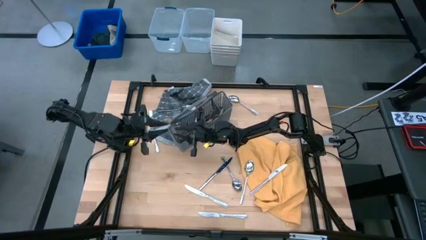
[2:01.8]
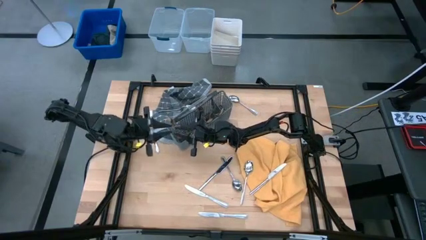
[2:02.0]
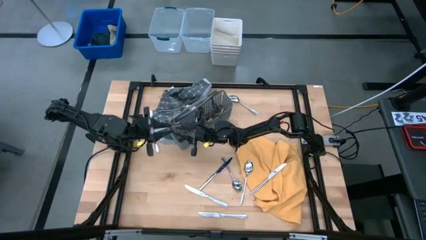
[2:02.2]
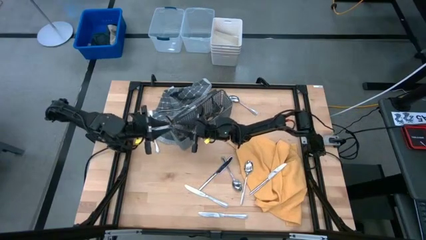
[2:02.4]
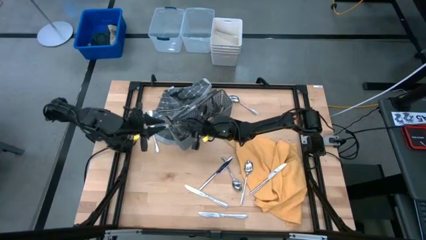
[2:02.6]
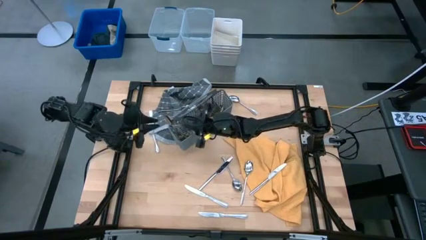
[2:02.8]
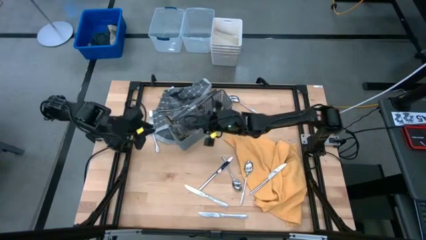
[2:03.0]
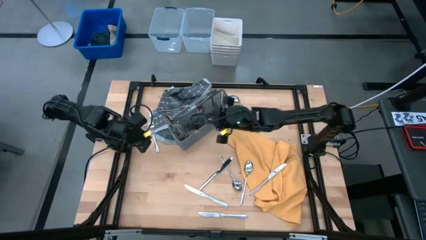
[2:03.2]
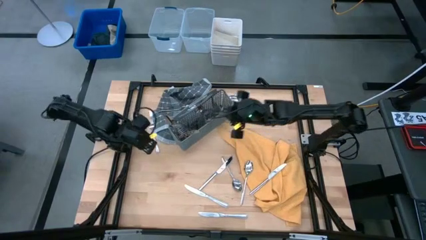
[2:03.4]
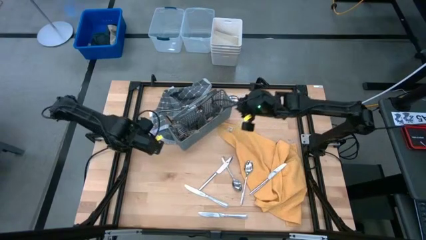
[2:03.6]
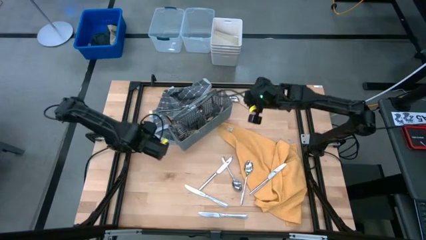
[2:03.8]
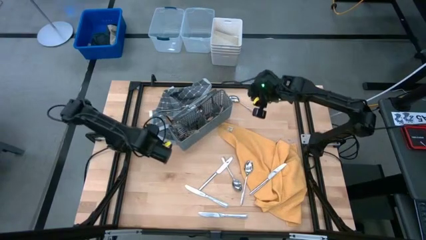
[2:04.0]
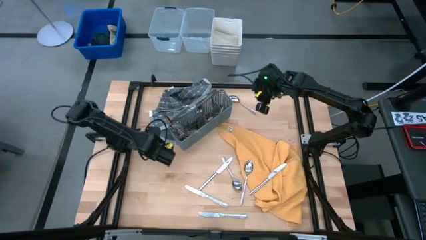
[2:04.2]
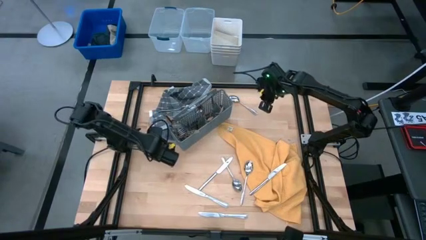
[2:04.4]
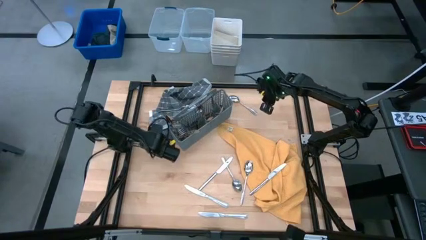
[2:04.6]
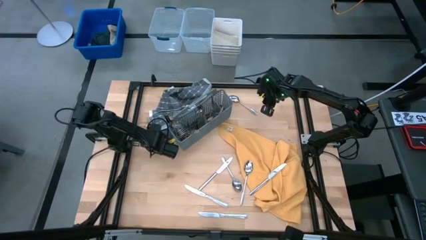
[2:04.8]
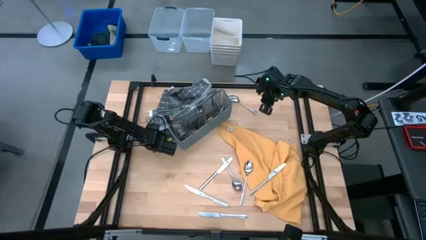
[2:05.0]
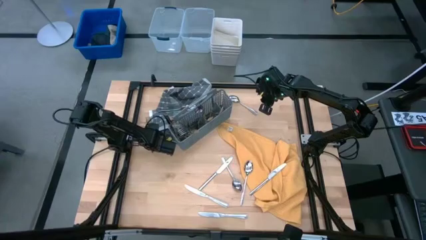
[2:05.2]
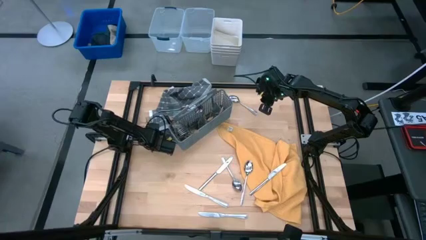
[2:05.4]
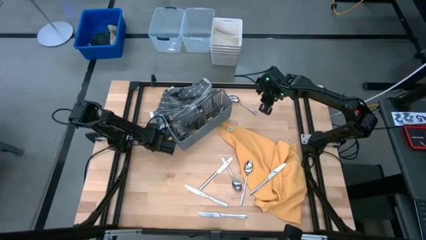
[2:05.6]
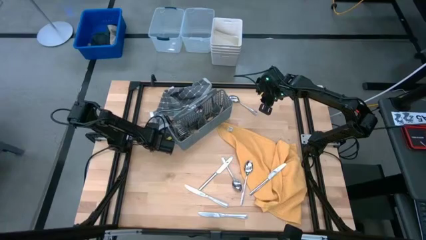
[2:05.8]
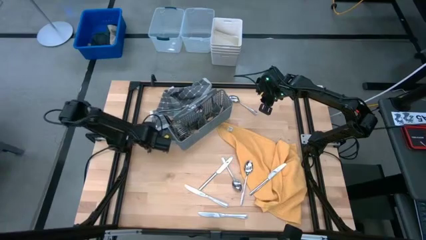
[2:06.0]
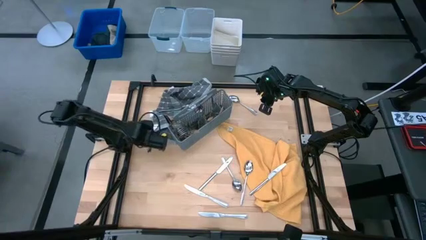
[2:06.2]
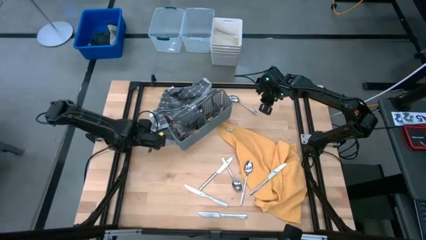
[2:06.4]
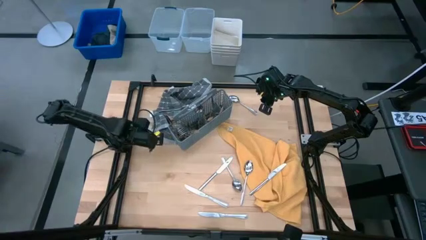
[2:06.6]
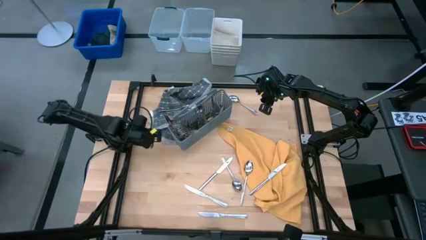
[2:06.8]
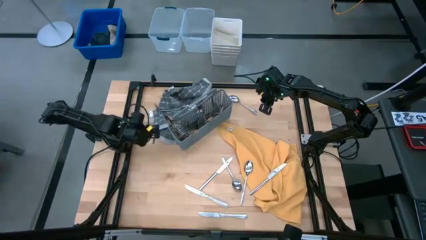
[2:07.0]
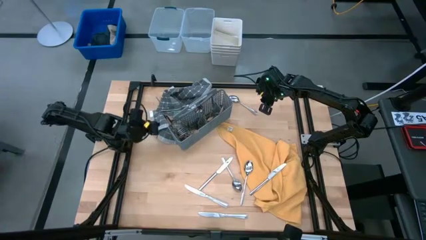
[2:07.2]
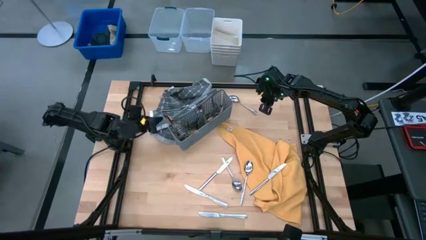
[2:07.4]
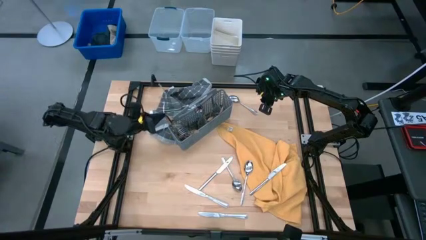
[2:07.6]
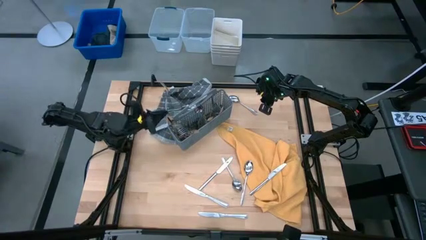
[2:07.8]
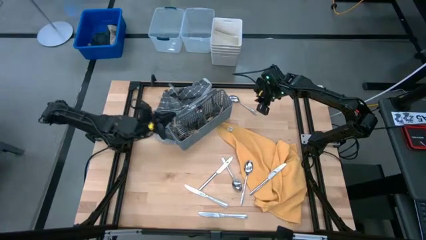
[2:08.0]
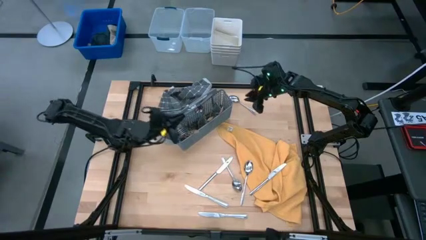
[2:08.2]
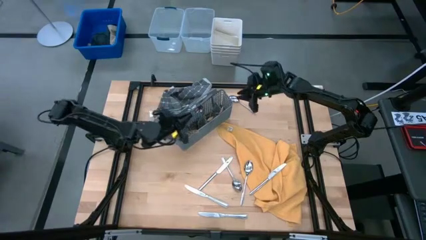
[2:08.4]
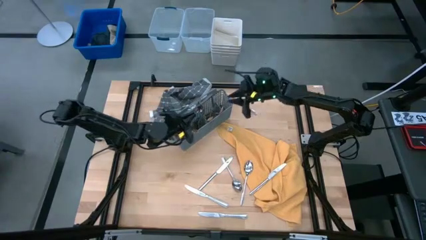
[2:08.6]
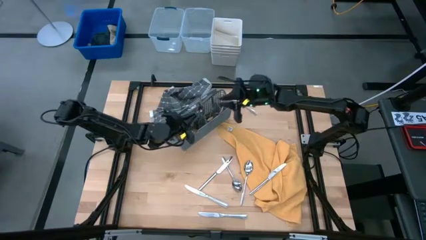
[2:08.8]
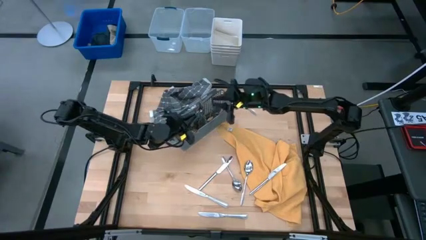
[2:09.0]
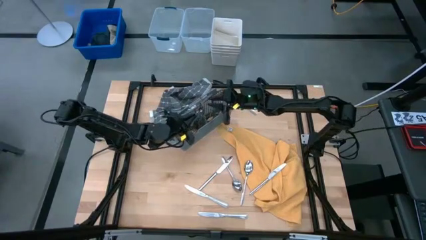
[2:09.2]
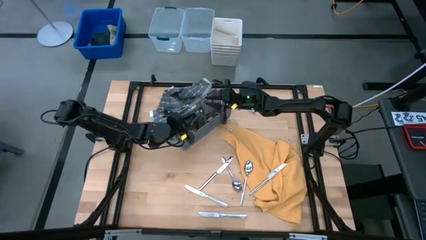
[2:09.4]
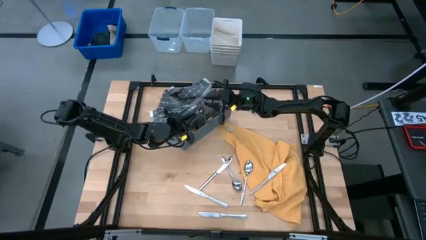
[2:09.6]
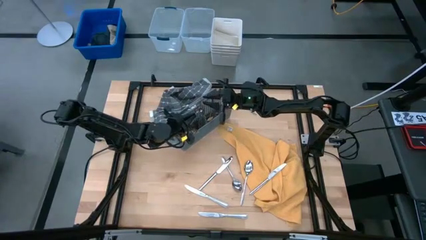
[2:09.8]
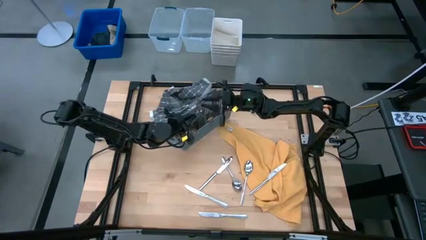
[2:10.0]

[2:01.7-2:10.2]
Task: Sort silverware
Put the silver fork into the gray silverware basket

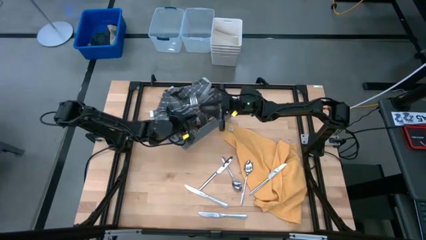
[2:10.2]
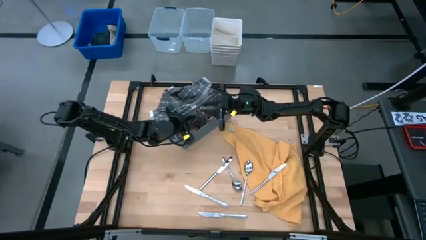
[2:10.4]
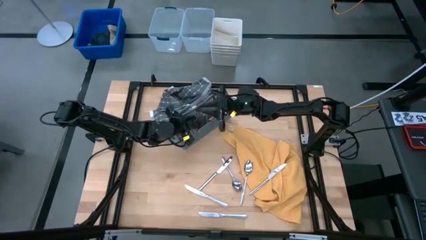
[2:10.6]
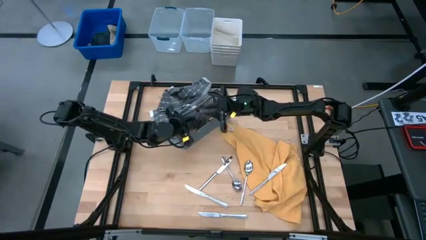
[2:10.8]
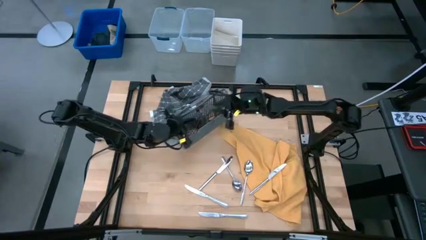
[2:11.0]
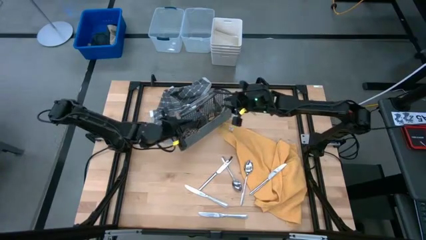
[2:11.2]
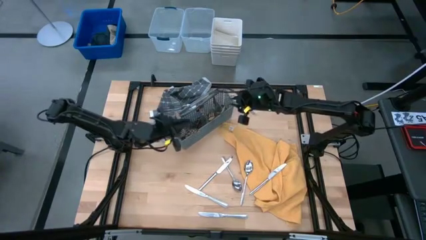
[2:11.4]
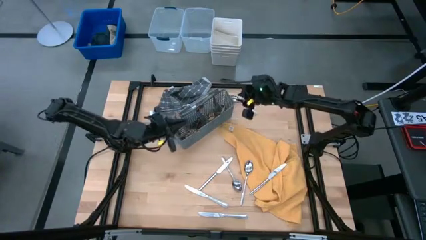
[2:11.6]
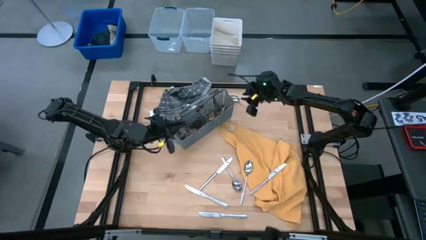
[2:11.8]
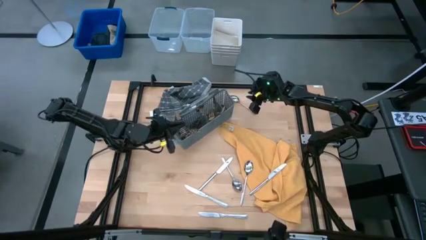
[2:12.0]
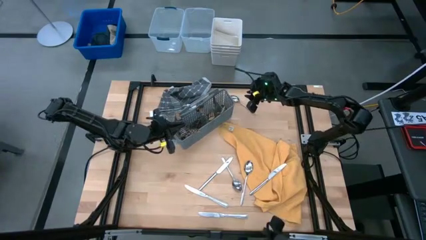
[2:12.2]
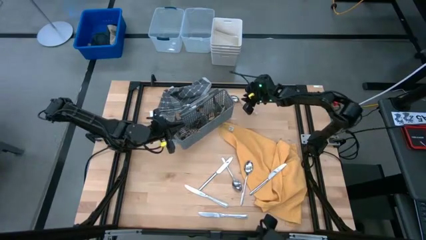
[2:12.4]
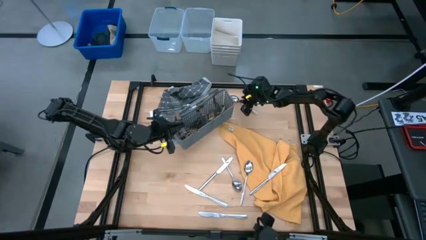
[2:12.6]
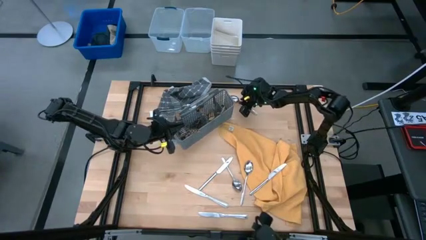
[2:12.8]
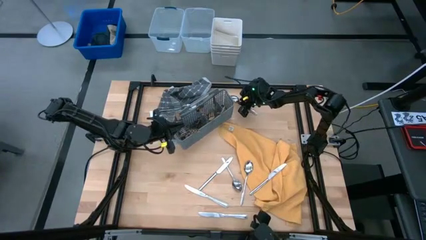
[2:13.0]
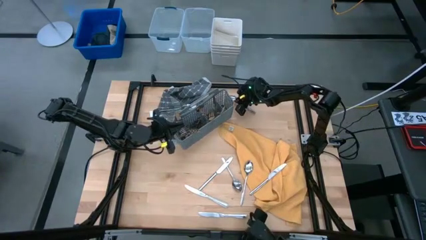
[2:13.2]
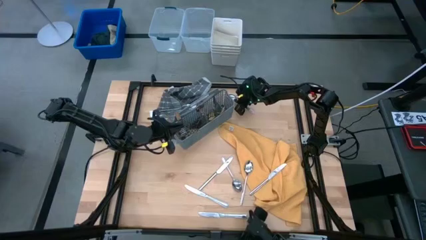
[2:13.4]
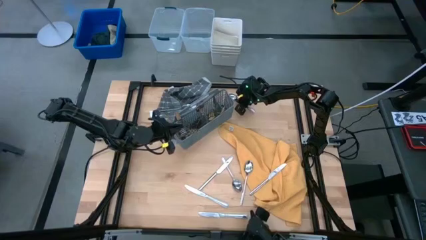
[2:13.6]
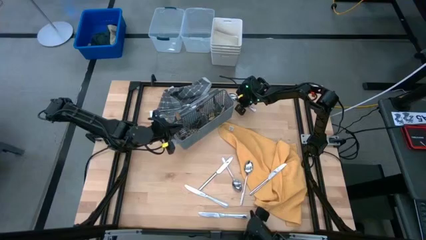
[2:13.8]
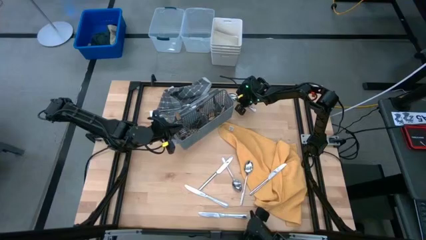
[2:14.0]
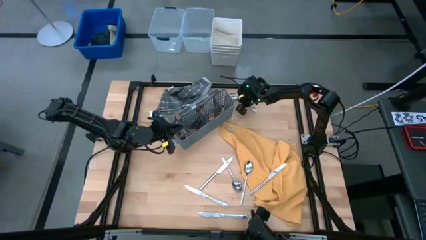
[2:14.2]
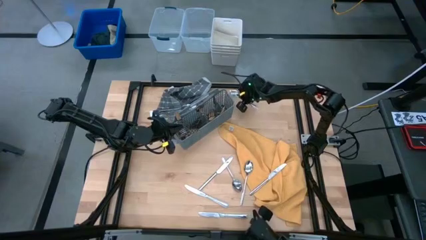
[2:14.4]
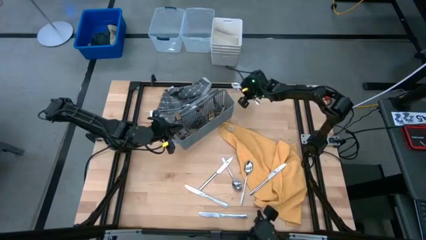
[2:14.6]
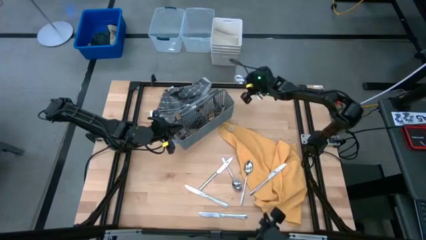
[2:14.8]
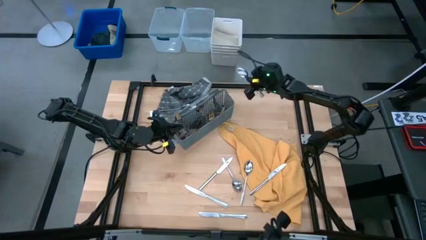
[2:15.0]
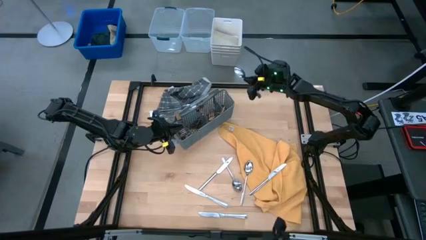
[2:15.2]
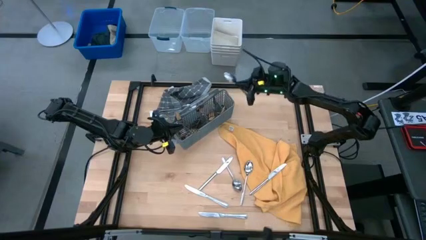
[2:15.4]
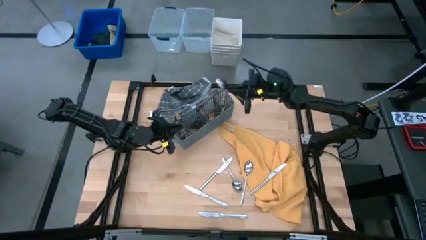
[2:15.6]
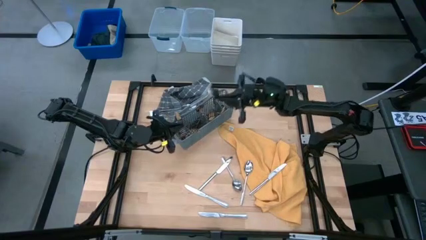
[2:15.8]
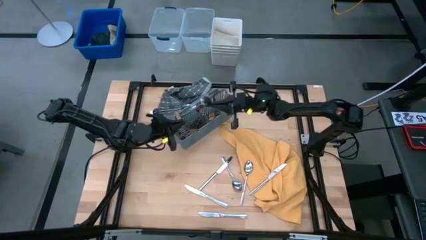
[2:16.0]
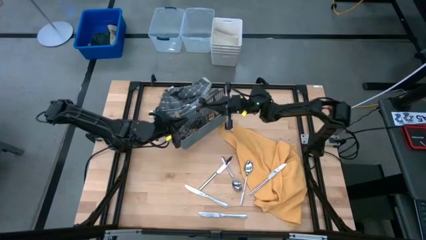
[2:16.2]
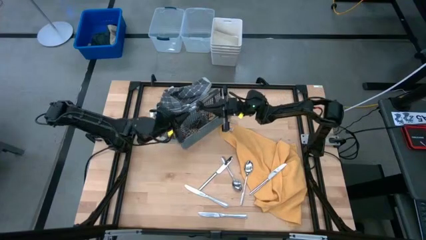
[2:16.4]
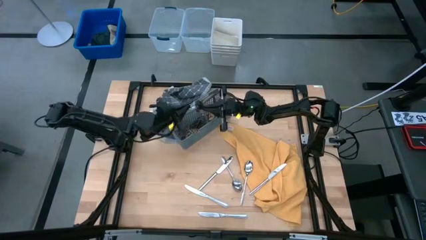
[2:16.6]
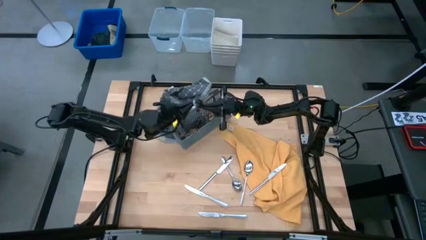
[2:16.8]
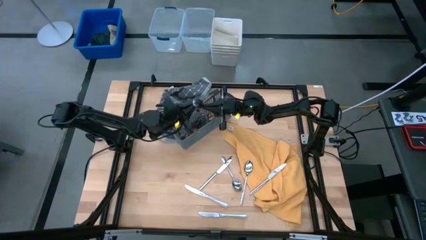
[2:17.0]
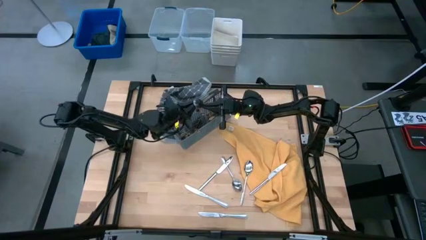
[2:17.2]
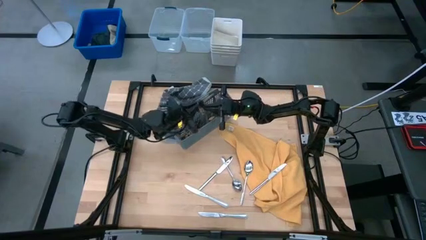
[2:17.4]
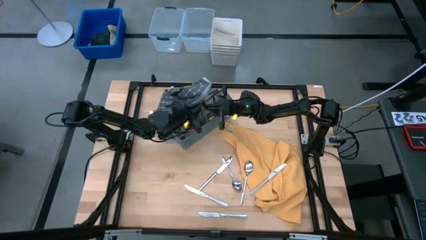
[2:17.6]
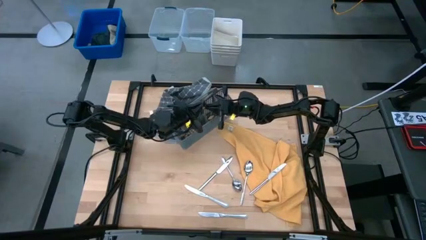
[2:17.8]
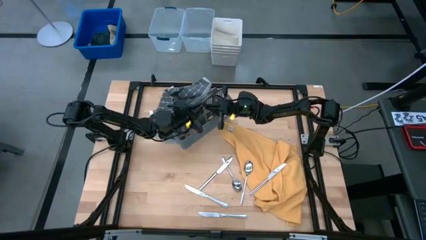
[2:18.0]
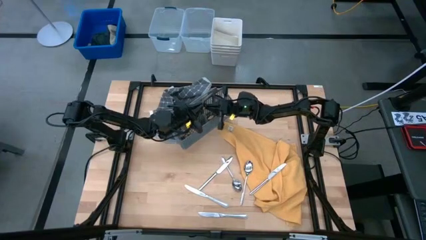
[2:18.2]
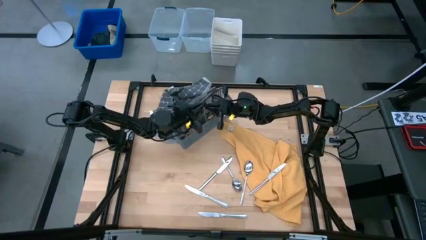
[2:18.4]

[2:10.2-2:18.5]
Put the silver spoon into the gray silverware basket
